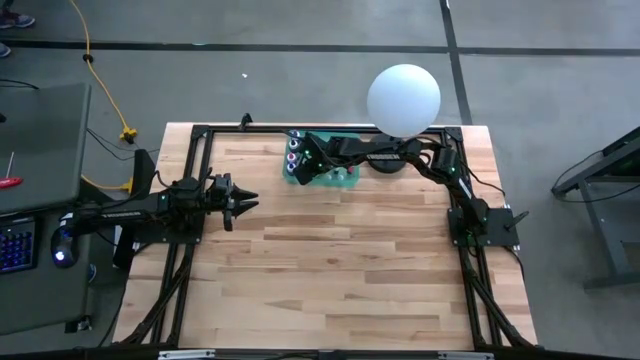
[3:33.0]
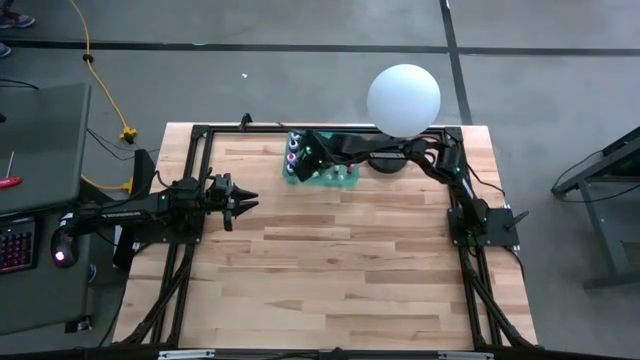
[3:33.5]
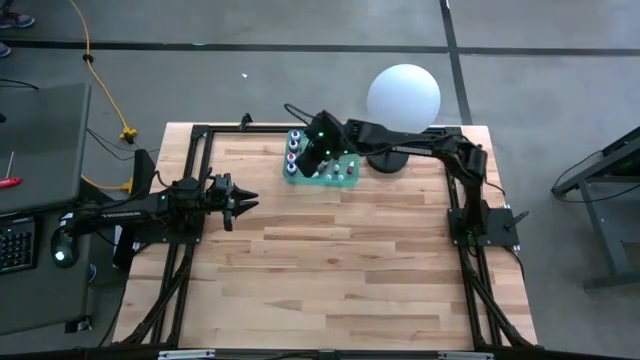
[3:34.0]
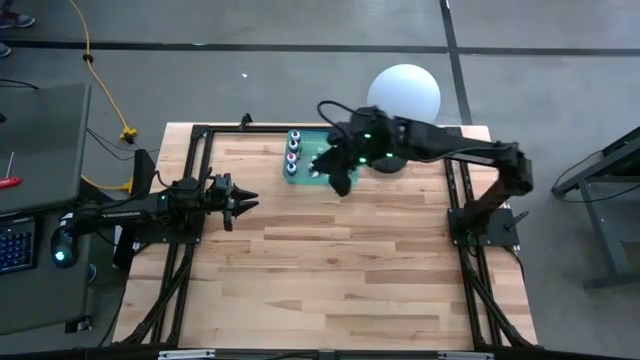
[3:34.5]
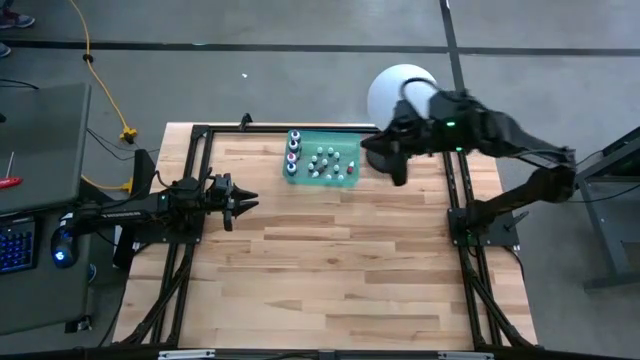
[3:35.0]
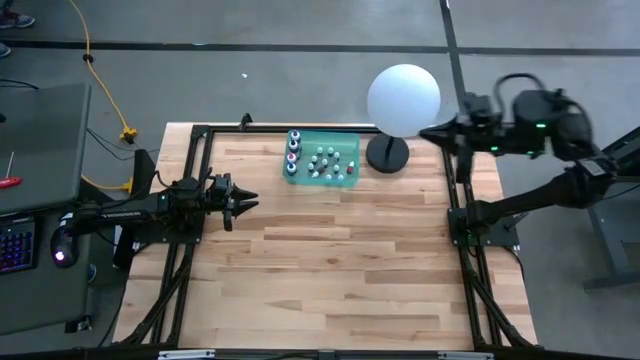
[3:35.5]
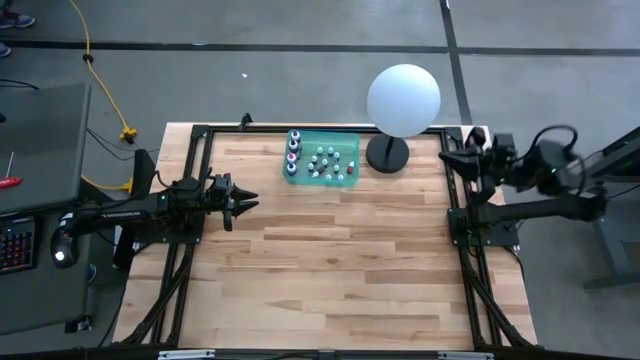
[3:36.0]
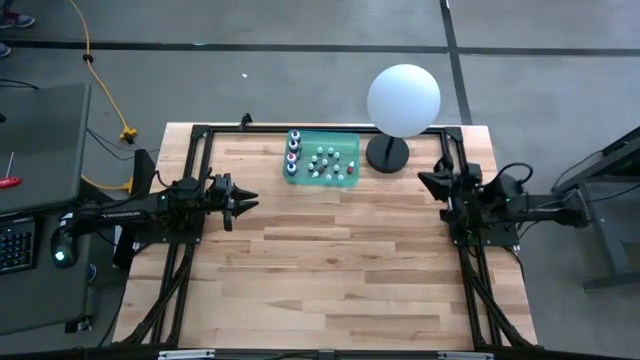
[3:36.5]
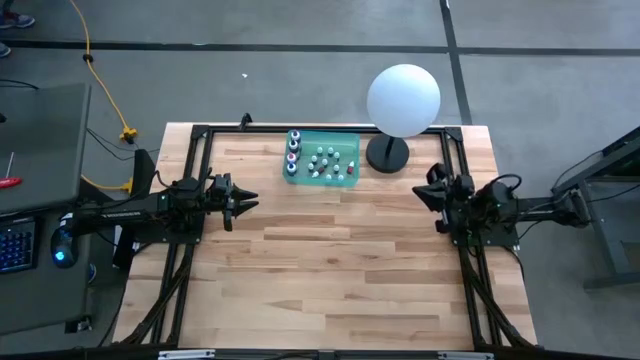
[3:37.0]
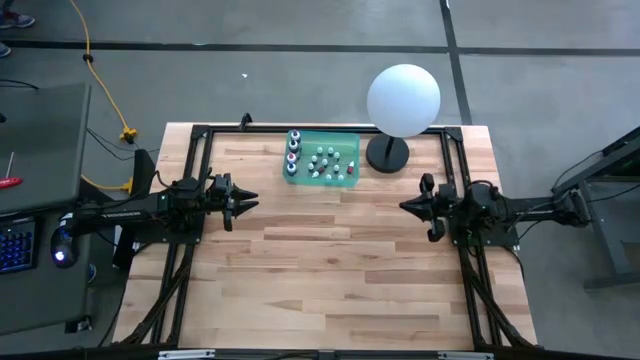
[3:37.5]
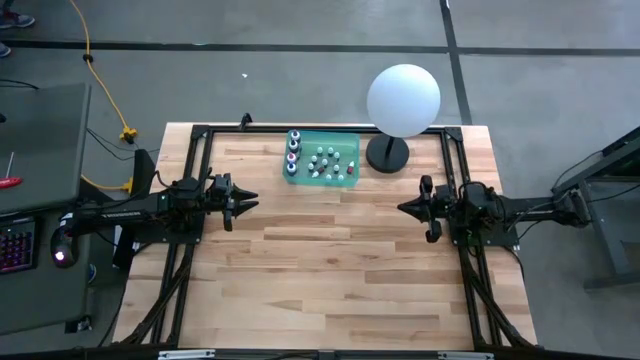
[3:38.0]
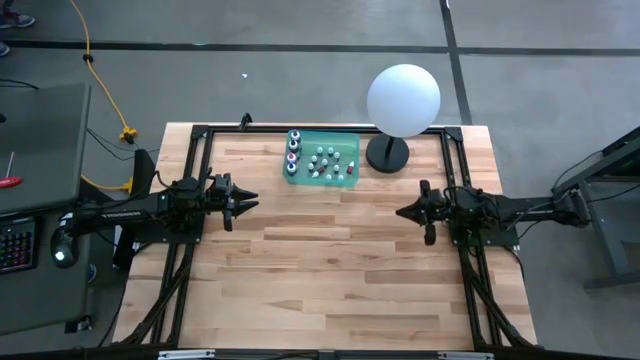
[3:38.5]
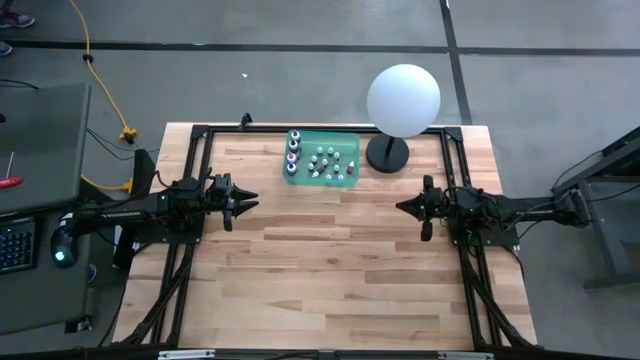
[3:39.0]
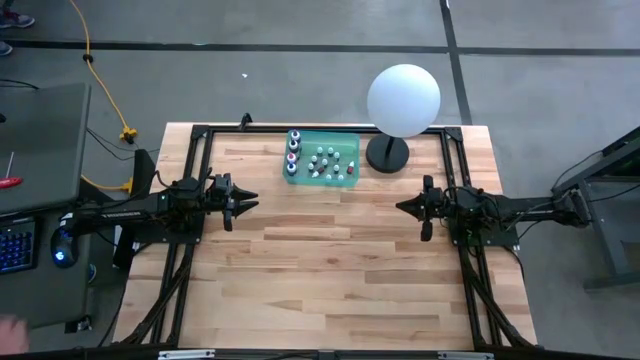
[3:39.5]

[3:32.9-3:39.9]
Task: Pick & Place food coloring
Return to Home Position

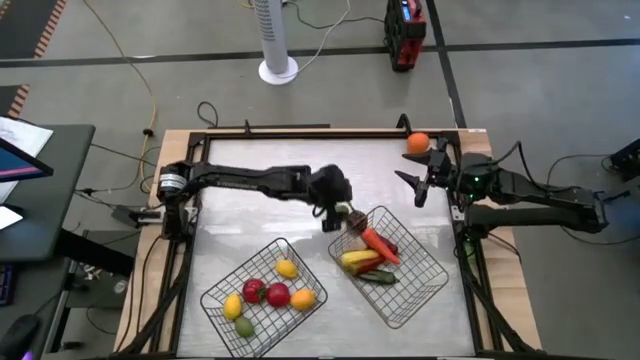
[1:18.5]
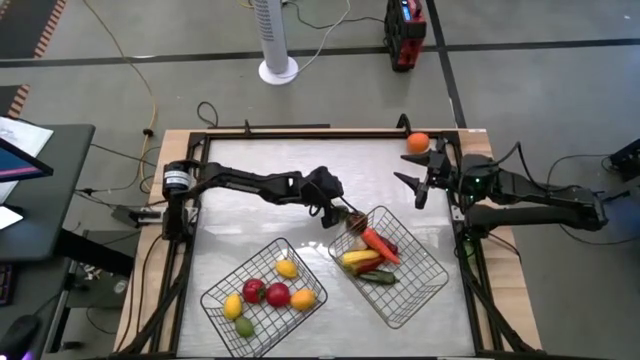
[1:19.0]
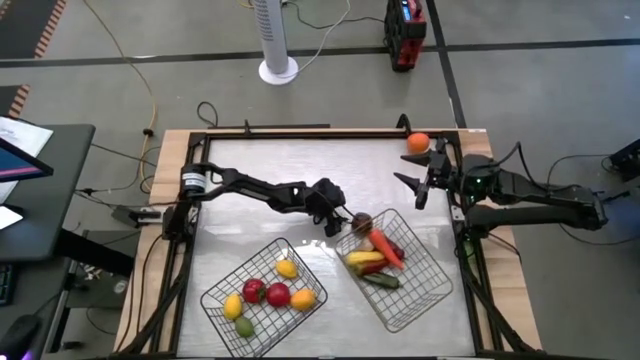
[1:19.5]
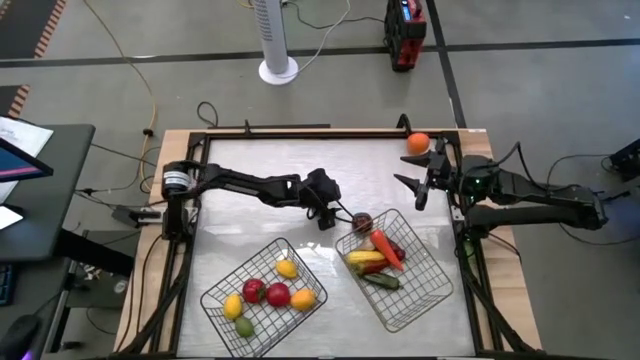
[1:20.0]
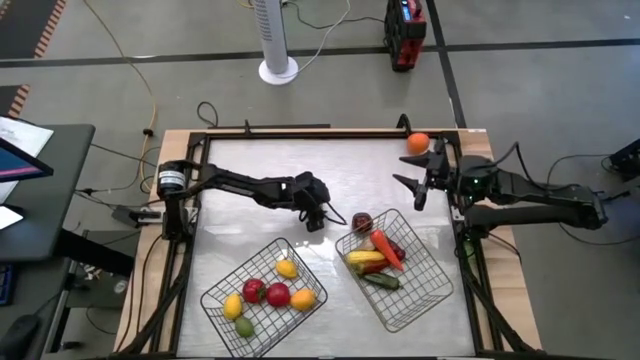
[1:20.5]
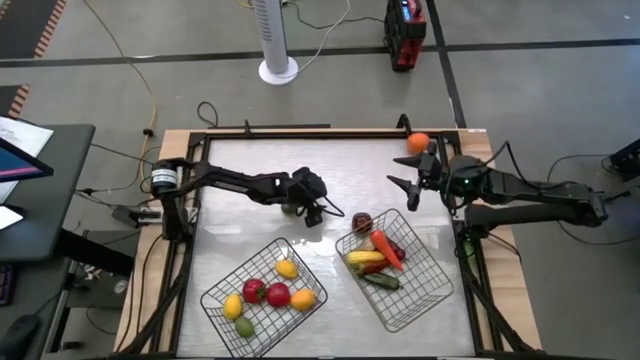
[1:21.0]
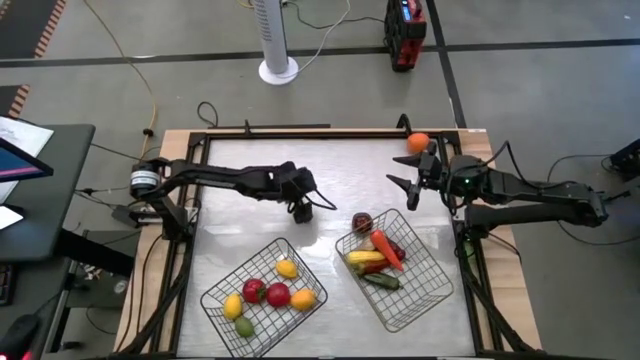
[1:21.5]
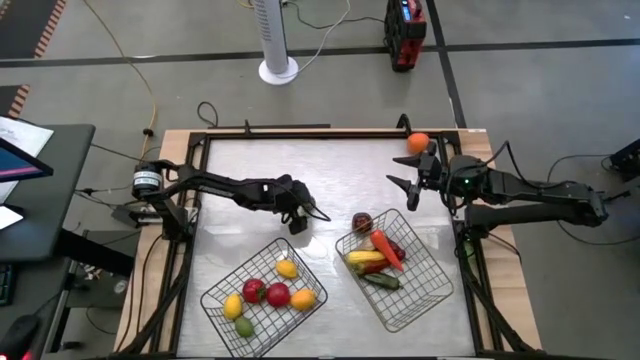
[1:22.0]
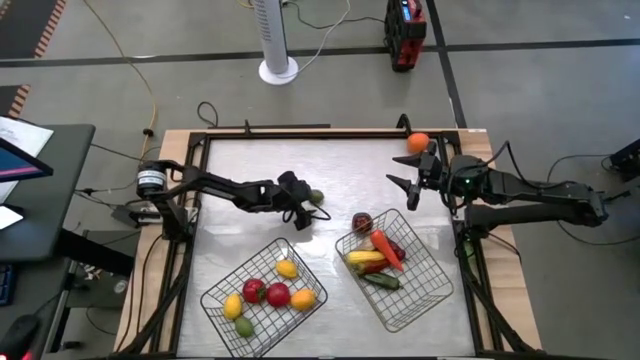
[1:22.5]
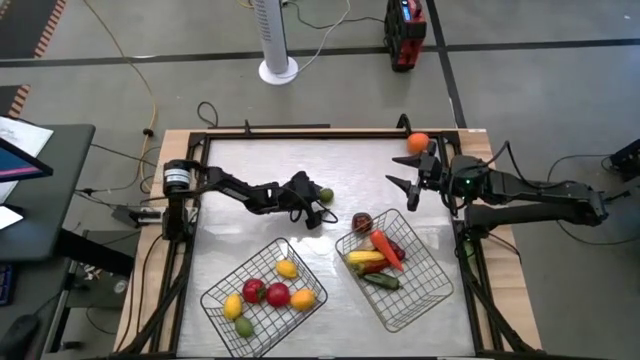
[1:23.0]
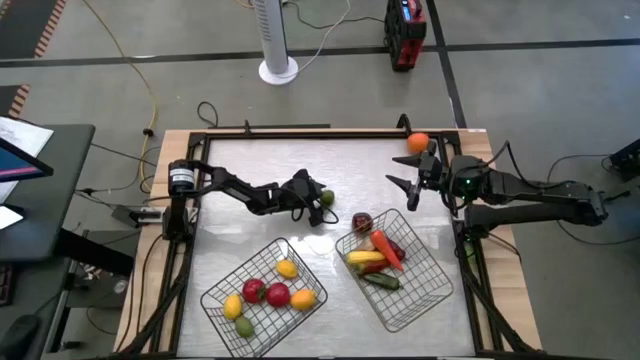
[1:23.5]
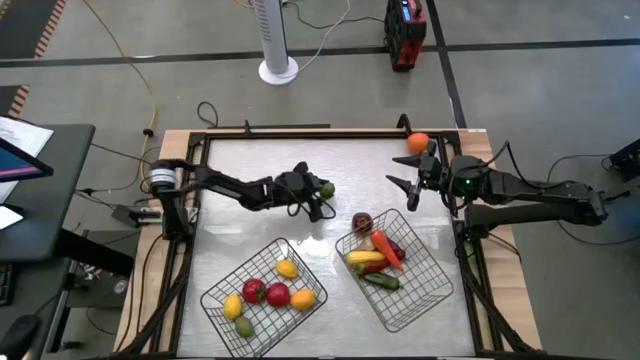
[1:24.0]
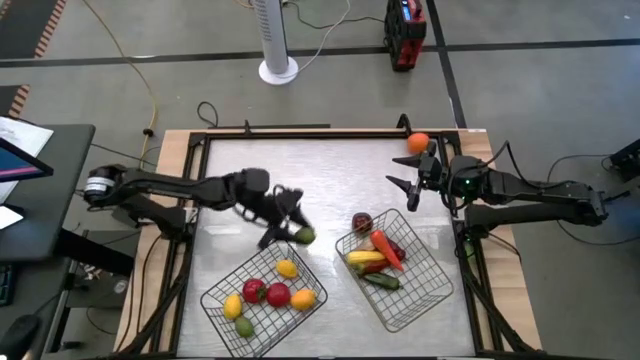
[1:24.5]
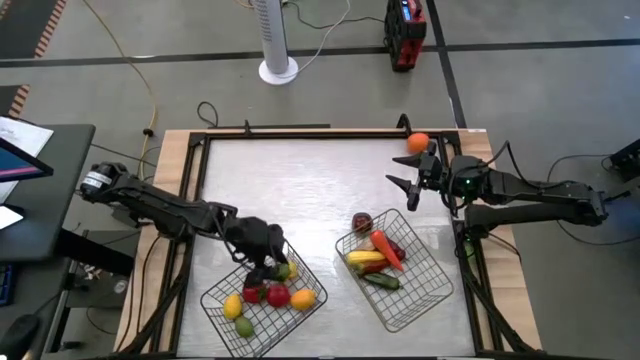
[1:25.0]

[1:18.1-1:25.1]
Task: Sort produce into baskets
Put the green lime into the black wire basket

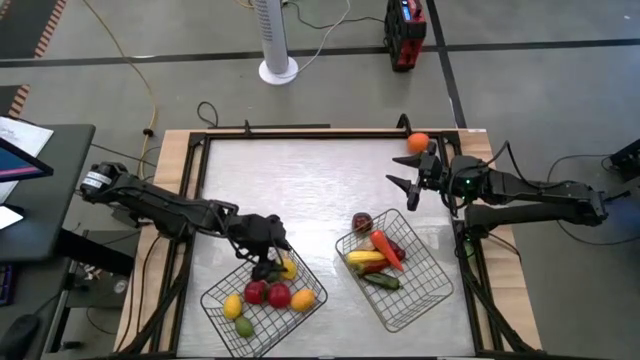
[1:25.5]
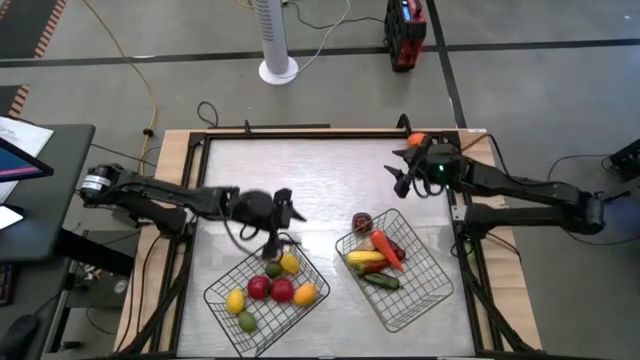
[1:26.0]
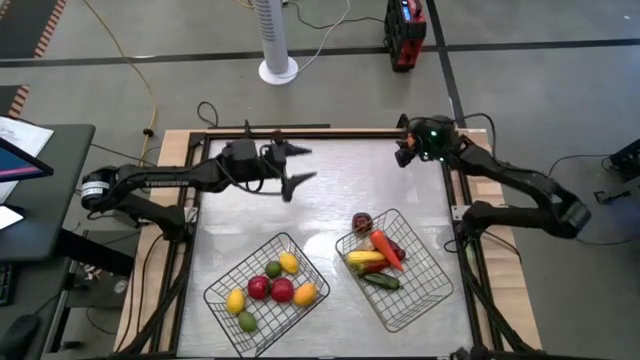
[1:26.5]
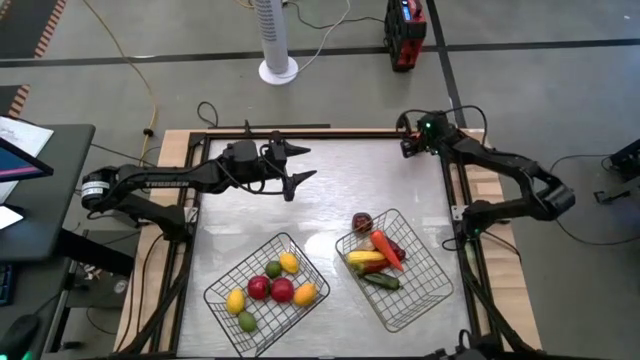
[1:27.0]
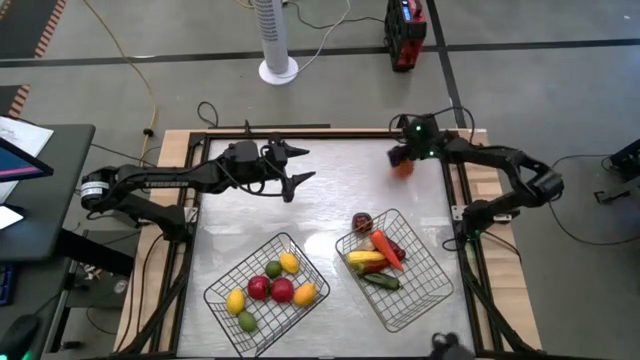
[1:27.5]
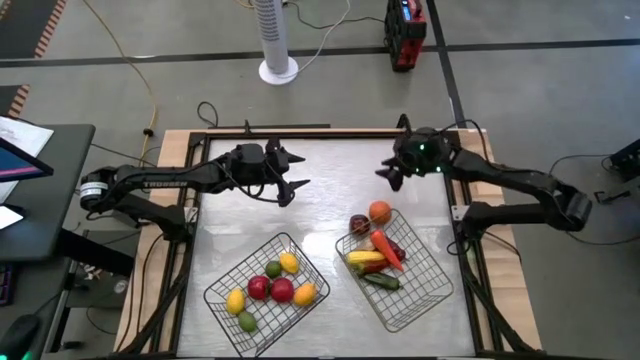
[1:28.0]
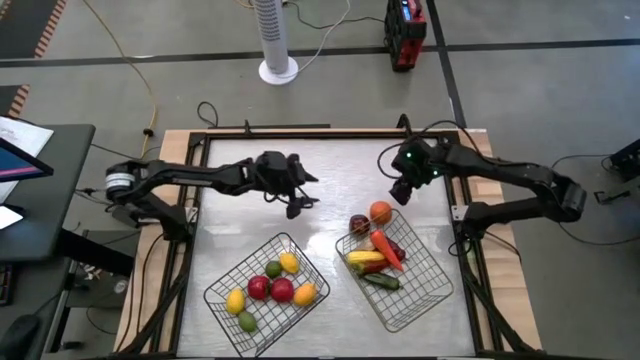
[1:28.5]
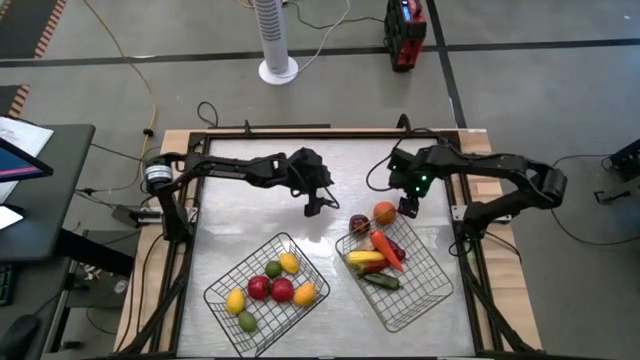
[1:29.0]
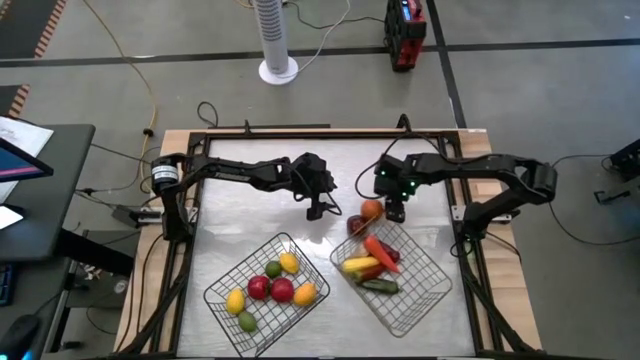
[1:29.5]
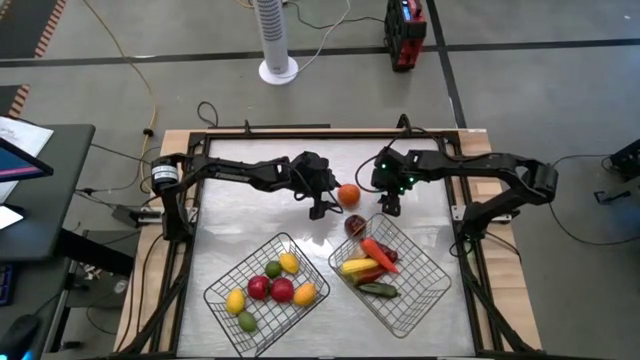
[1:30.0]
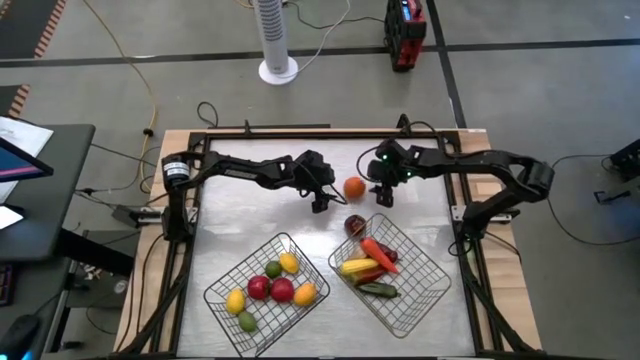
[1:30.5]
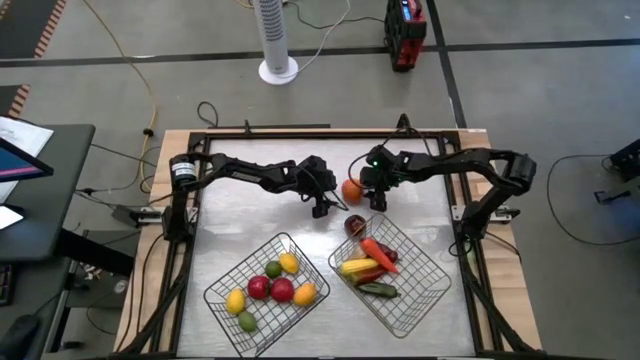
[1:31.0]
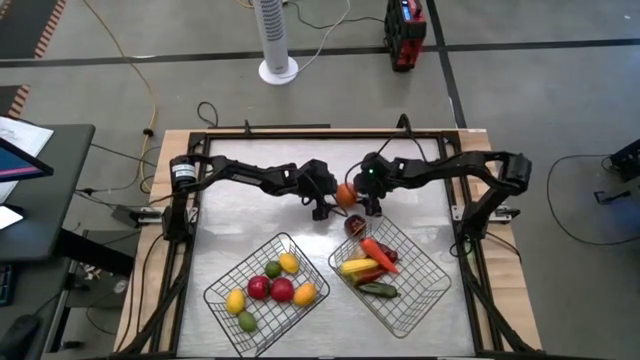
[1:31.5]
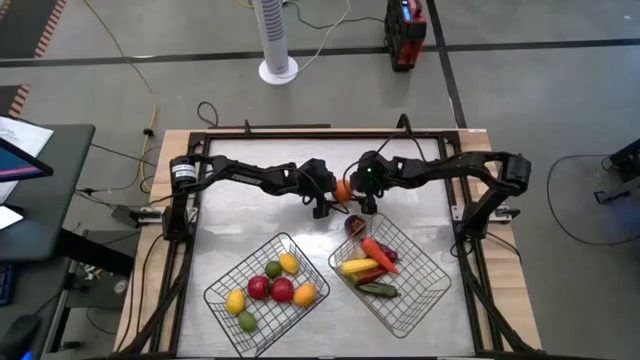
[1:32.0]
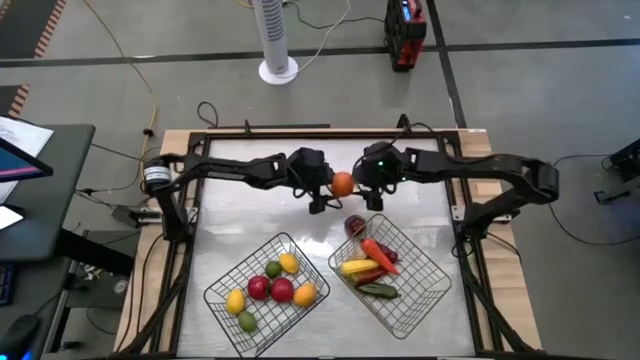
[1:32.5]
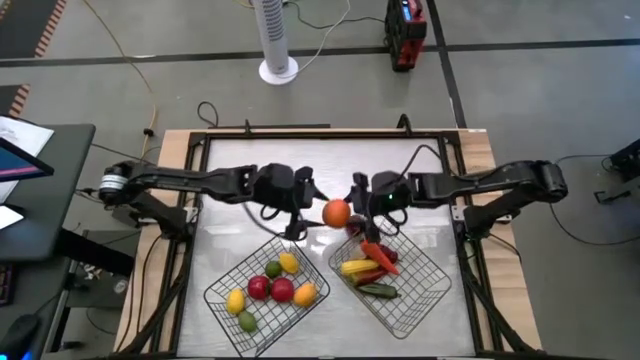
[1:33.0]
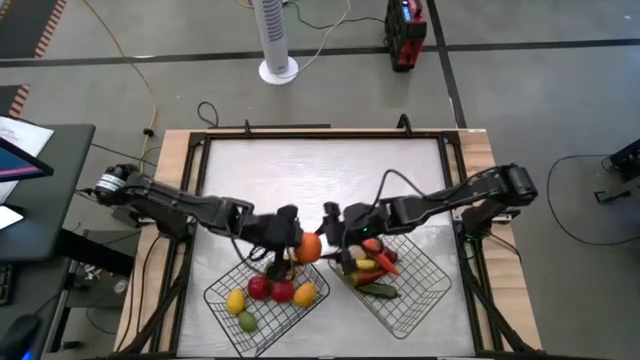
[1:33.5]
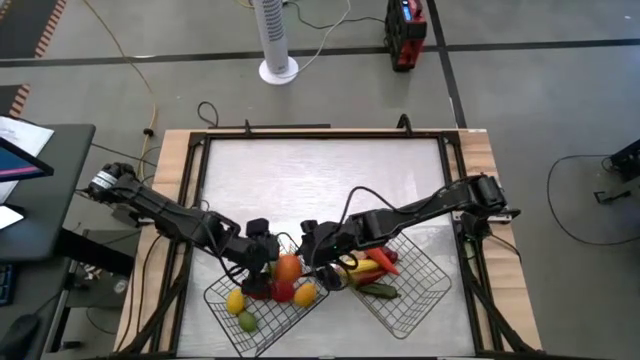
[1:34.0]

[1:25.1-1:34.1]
Put the orange into the black basket
